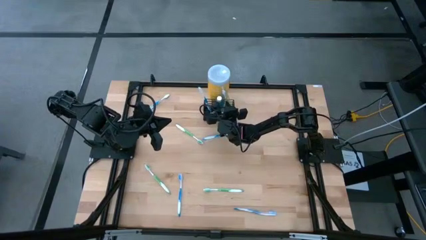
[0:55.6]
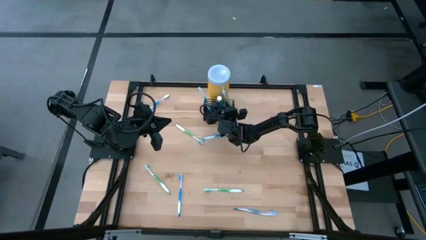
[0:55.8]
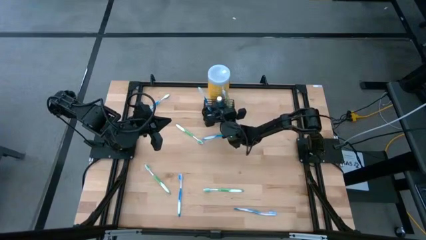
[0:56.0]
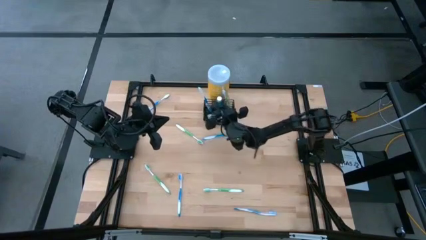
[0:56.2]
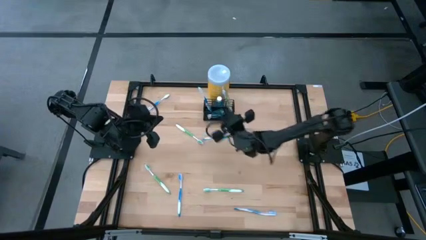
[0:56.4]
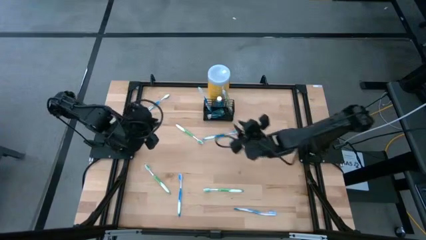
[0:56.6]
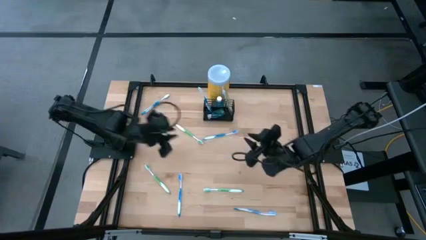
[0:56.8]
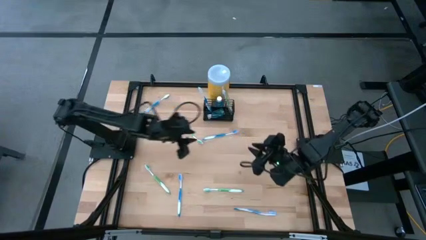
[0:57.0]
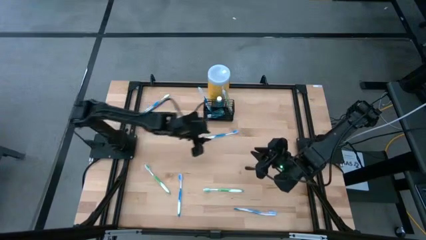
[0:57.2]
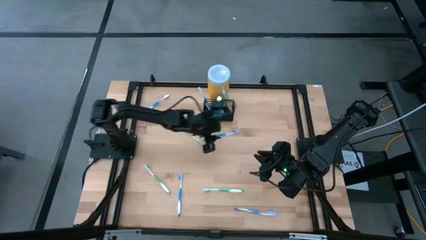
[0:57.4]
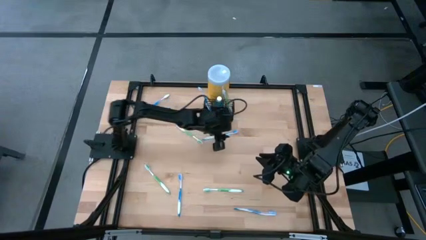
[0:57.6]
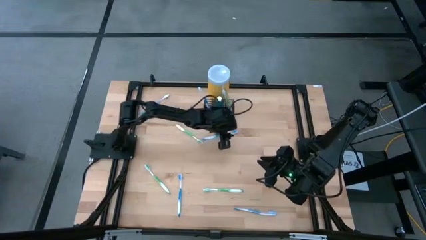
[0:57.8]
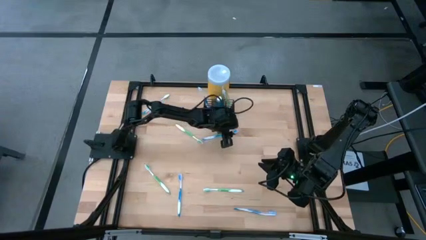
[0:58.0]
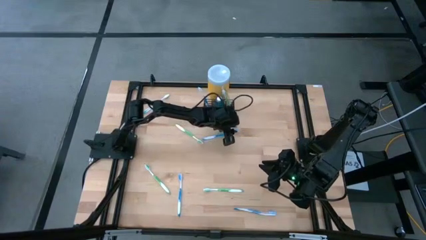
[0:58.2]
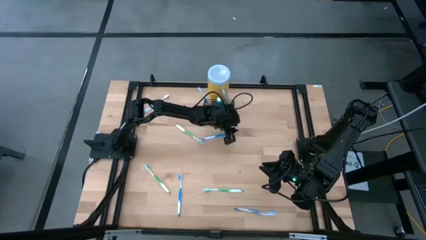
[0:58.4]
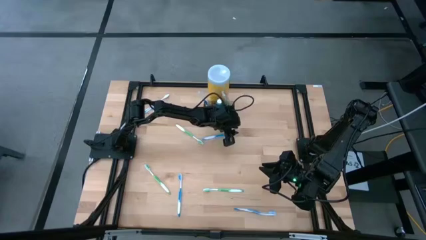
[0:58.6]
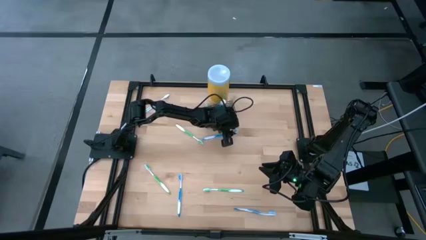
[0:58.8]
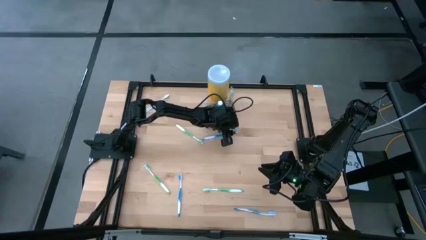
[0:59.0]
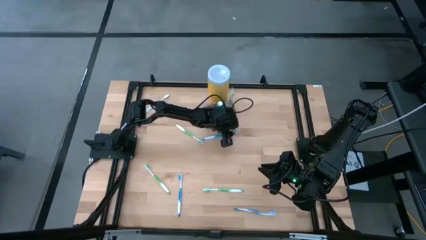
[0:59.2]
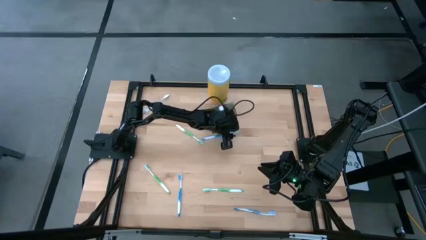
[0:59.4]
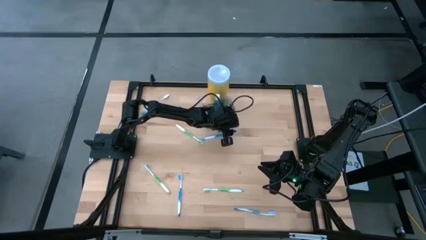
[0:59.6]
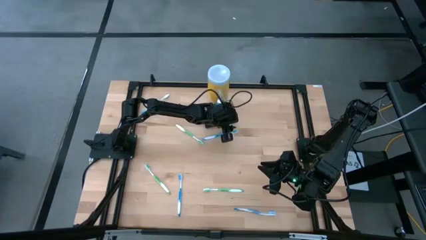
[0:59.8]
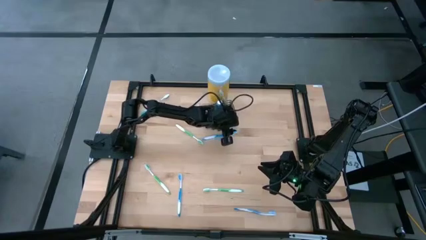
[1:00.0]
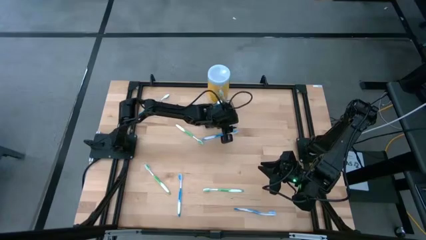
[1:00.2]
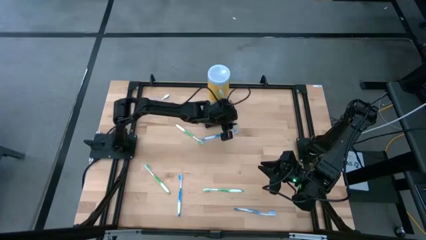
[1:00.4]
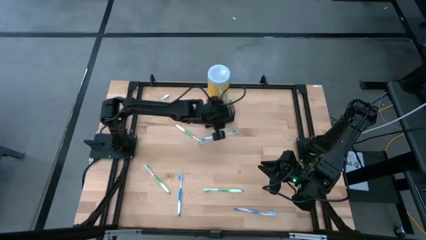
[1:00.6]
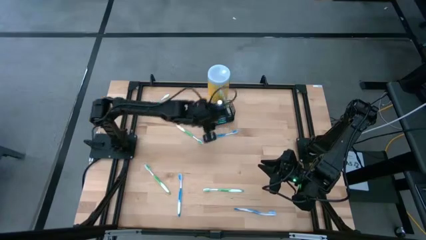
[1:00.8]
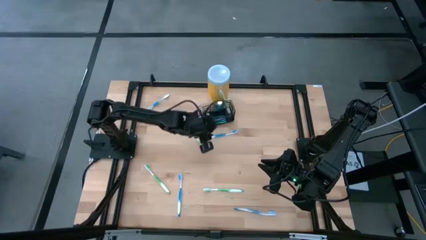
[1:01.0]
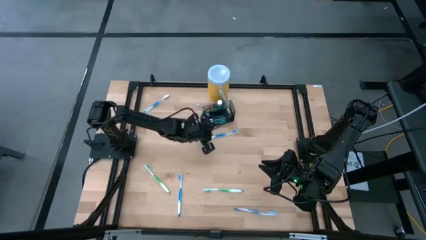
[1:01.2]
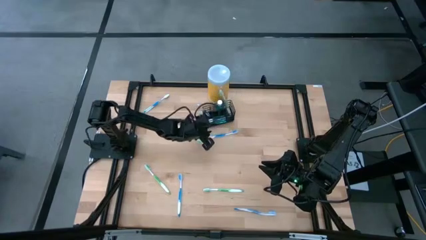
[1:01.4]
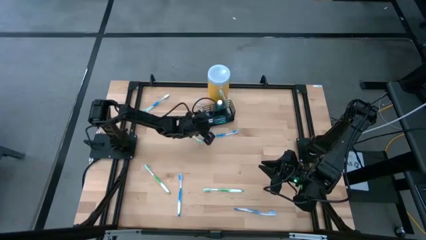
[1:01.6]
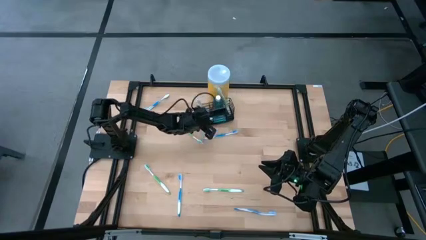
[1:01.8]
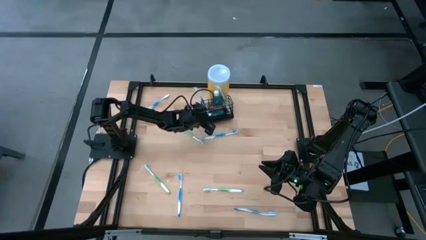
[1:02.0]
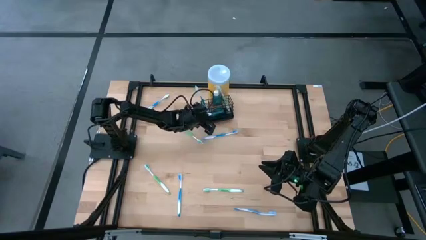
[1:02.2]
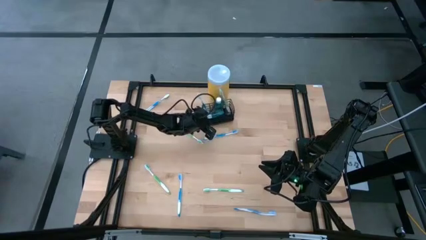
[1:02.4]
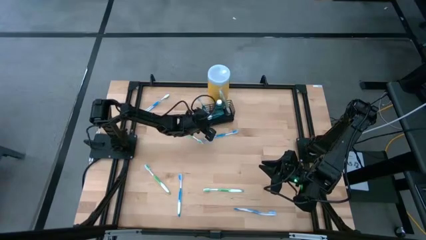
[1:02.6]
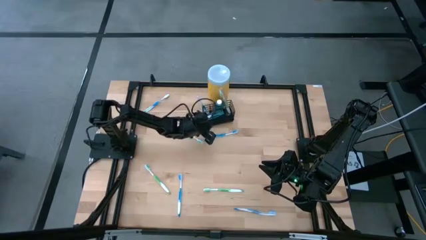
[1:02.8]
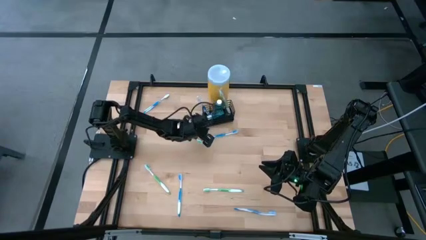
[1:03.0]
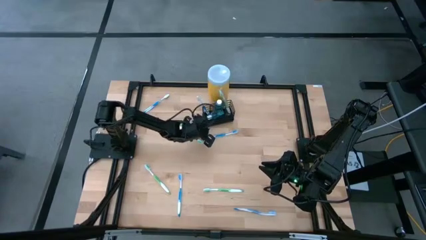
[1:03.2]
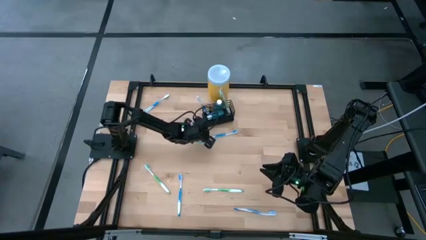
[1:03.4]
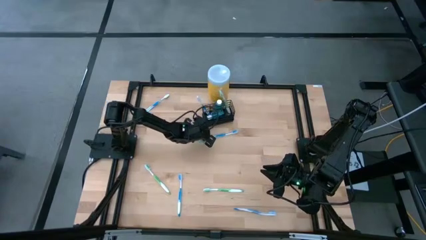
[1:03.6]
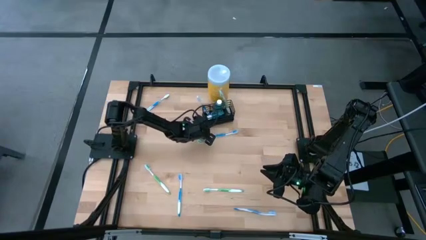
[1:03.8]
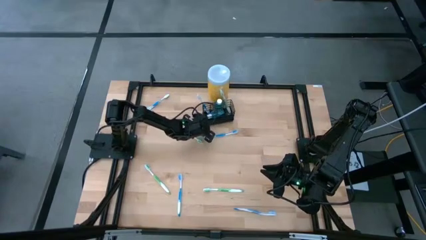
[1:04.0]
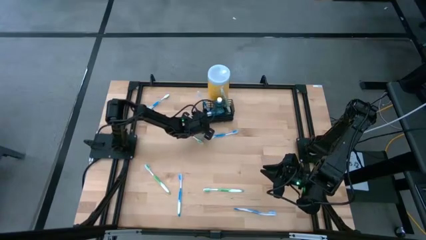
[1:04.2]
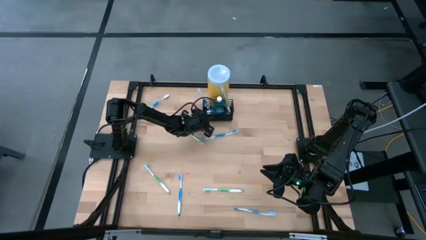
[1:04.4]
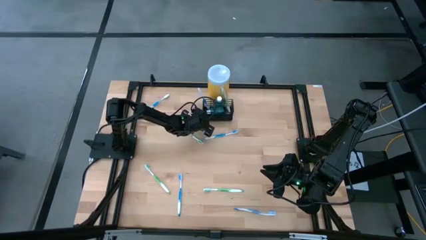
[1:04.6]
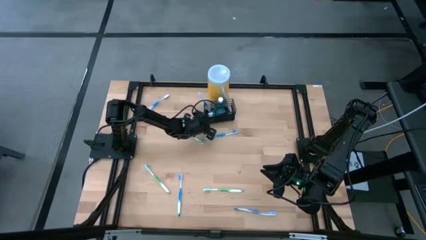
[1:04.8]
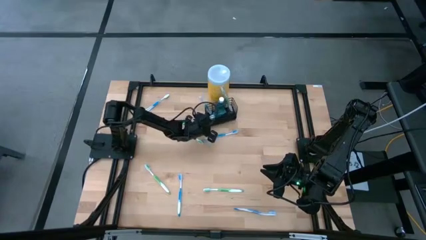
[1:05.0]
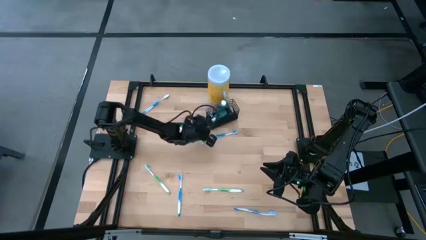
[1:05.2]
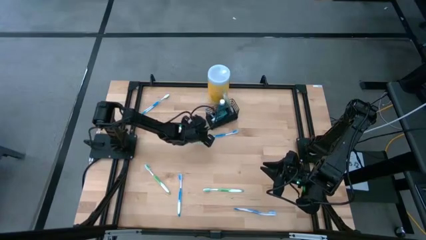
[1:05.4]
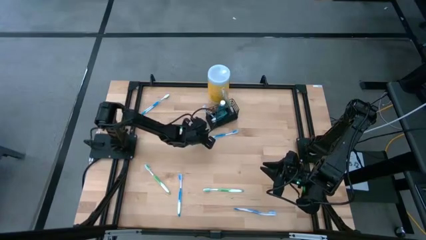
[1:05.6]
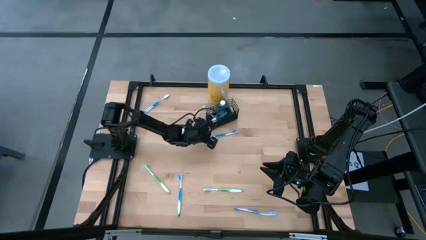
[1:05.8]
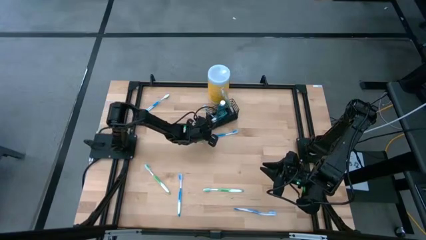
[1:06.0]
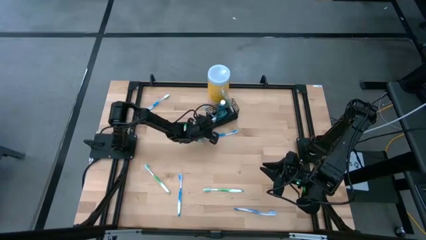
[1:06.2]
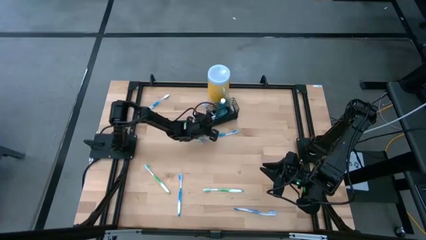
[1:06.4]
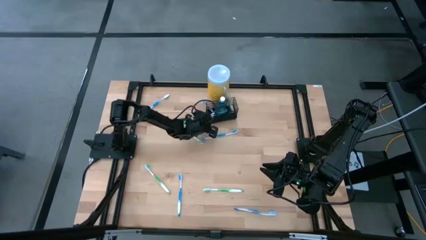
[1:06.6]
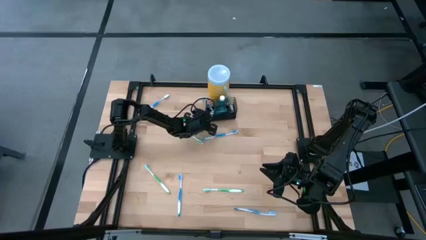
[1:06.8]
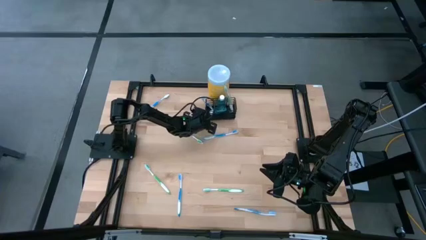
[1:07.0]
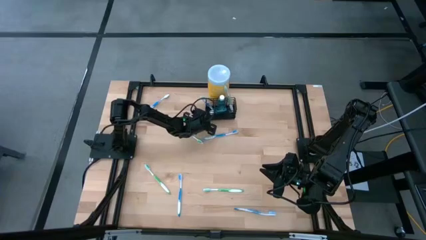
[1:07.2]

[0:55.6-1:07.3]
Task: Pick & Place toothbrushing station
Adjust the wire organizer

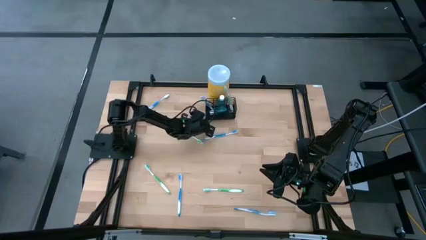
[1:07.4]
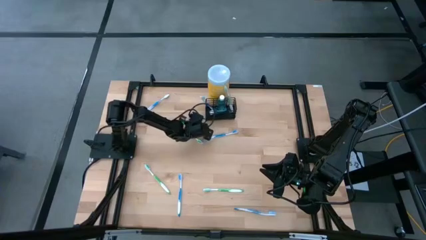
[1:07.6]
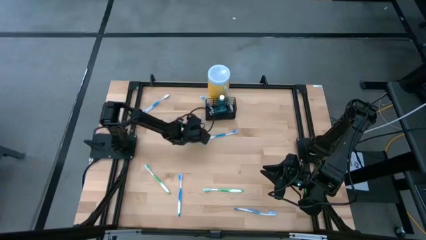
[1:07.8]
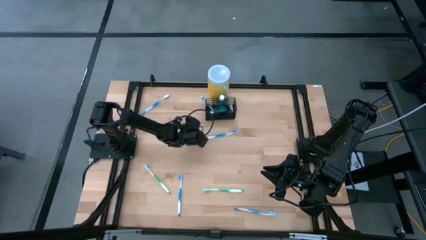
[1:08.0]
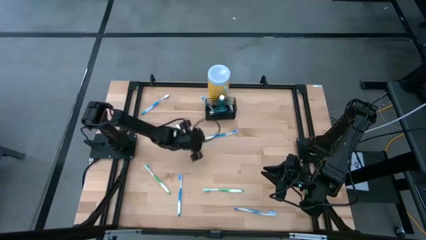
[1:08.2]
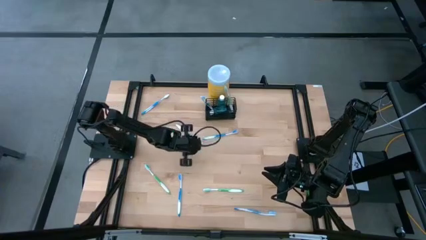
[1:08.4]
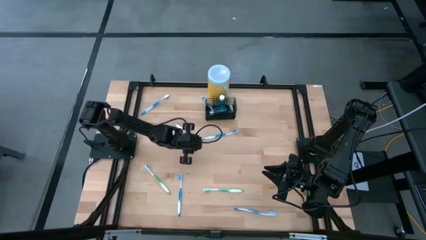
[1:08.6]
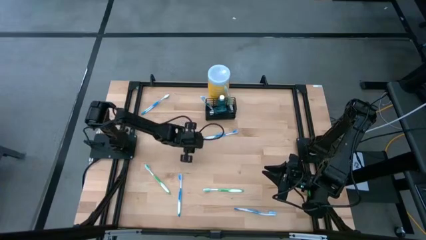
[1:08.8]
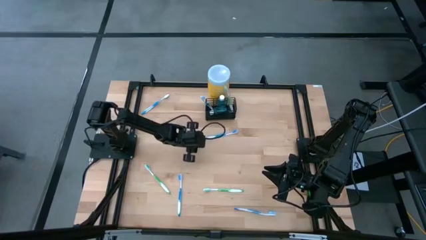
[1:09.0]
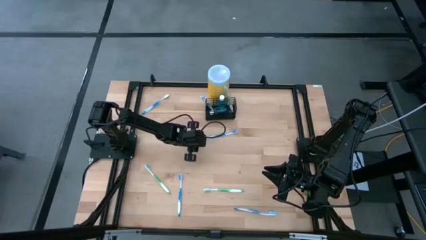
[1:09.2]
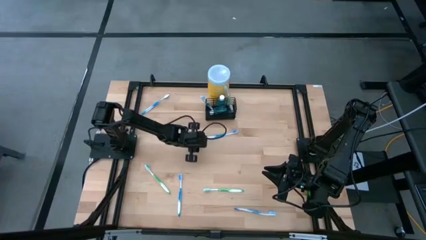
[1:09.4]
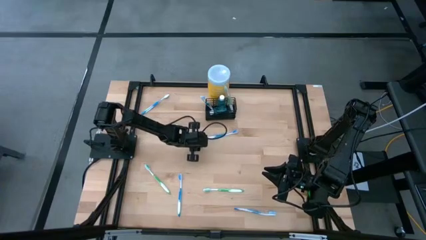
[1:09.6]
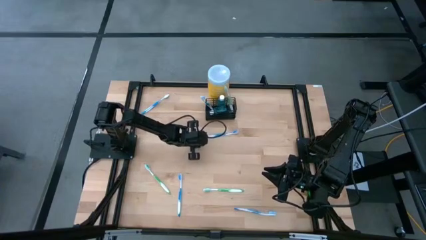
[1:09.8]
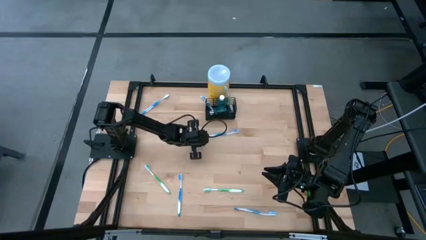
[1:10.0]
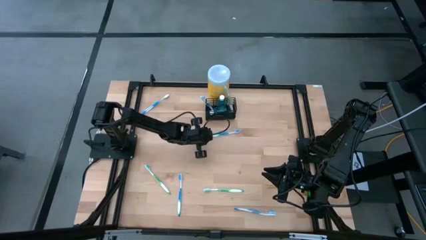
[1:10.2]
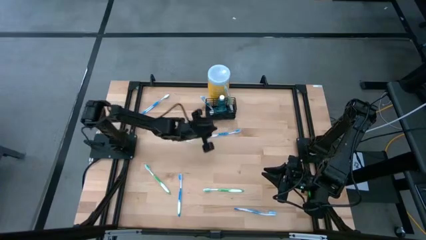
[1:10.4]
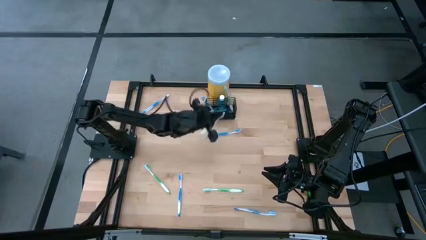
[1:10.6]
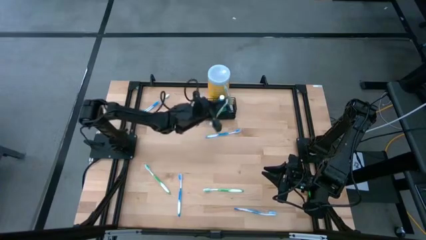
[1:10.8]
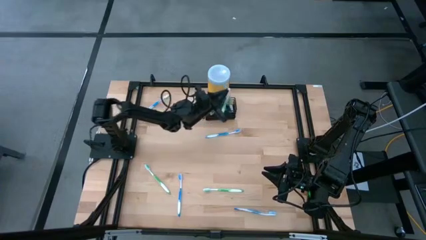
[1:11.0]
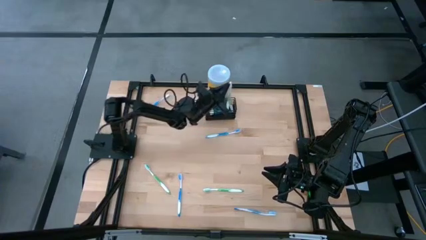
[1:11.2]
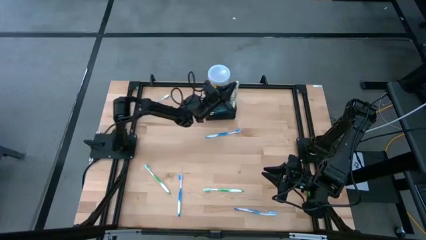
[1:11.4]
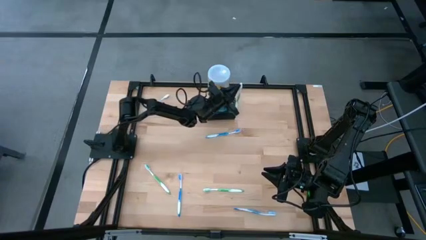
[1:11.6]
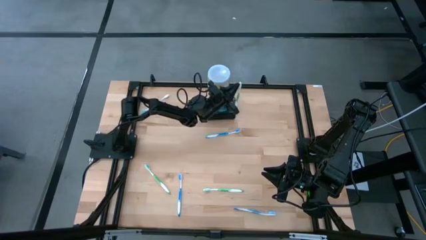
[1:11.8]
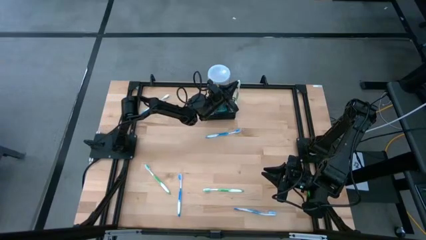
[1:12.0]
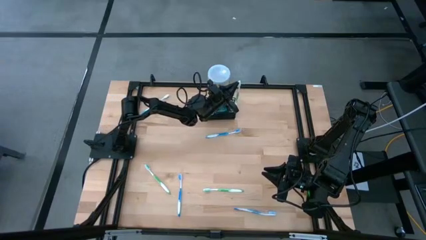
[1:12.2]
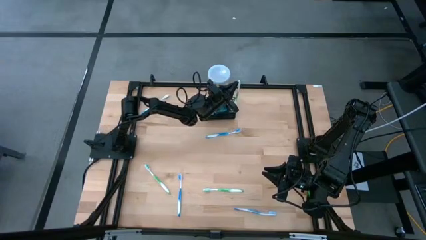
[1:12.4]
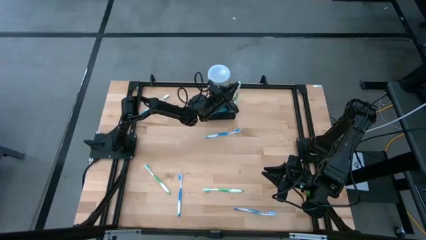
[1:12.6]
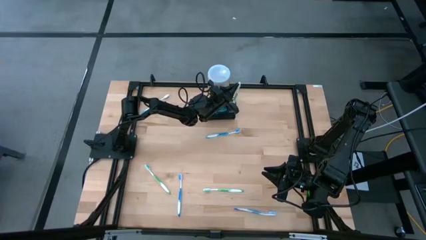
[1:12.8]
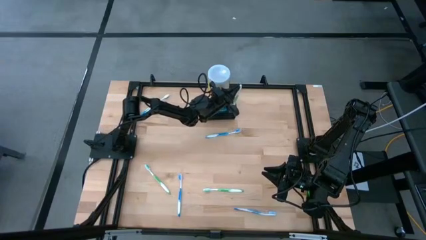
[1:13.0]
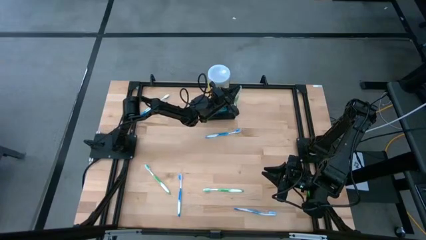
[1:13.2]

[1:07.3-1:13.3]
Put the green toothbrush in the wire organizer
